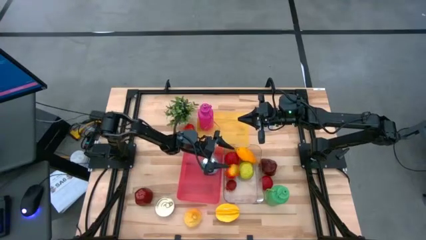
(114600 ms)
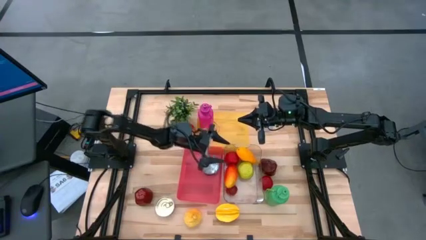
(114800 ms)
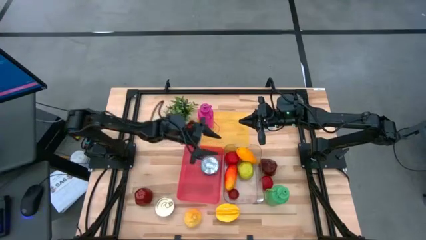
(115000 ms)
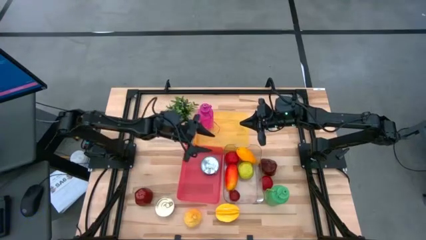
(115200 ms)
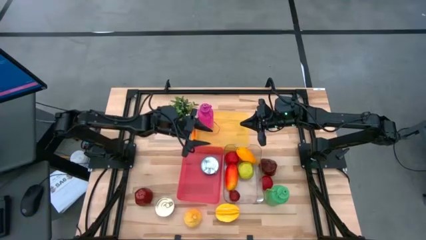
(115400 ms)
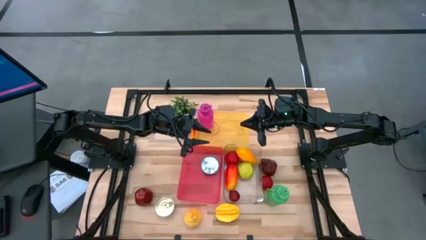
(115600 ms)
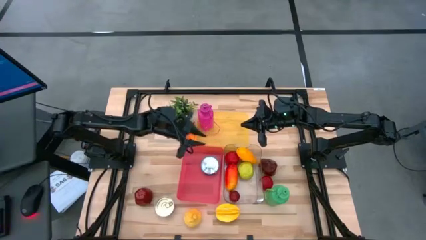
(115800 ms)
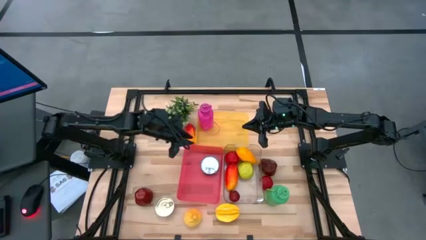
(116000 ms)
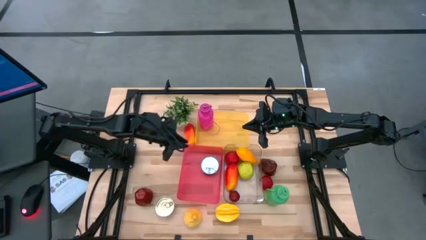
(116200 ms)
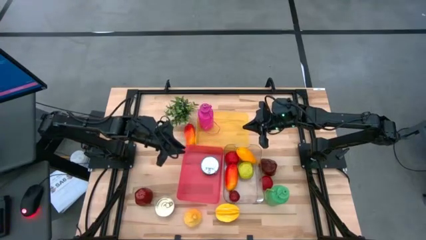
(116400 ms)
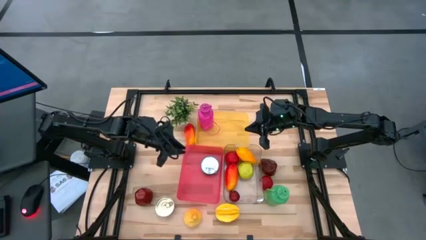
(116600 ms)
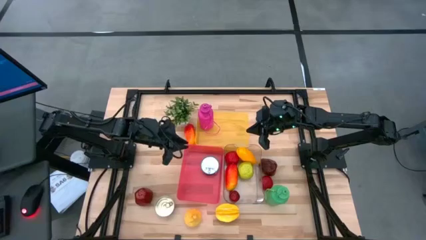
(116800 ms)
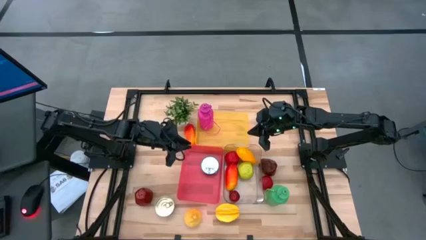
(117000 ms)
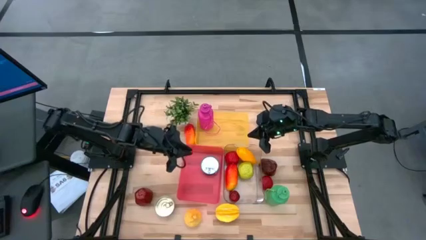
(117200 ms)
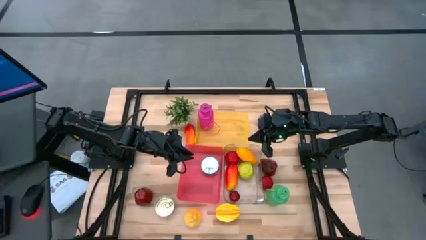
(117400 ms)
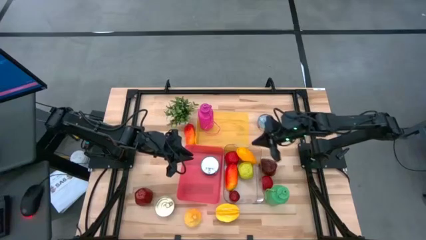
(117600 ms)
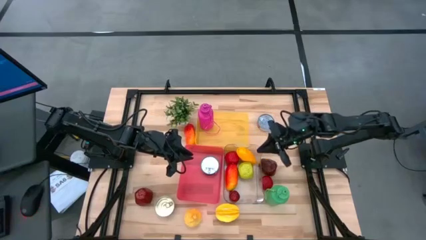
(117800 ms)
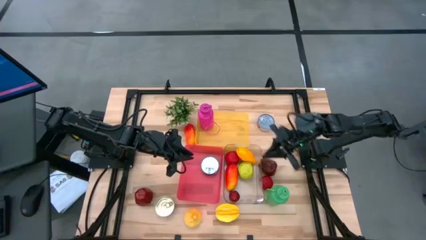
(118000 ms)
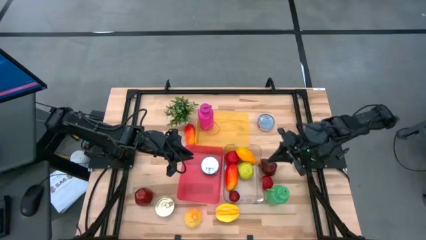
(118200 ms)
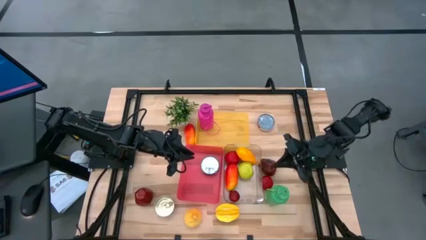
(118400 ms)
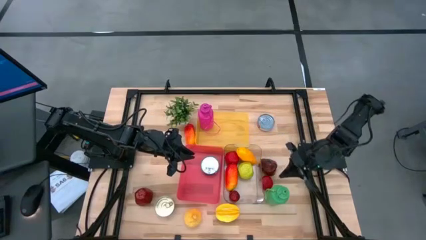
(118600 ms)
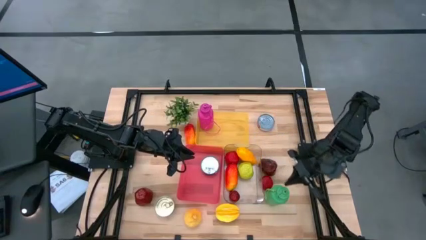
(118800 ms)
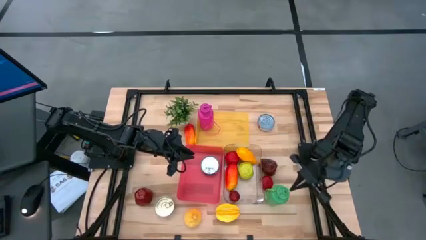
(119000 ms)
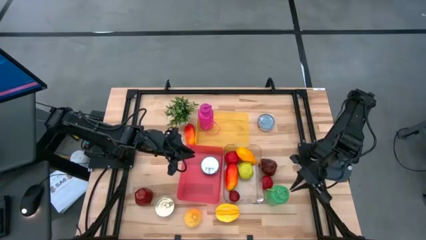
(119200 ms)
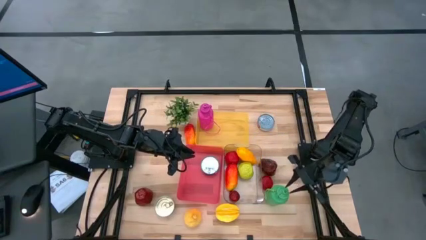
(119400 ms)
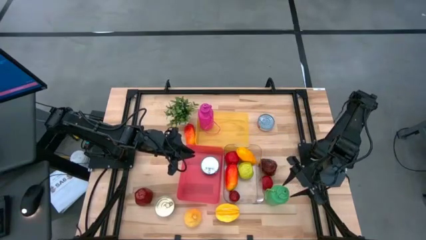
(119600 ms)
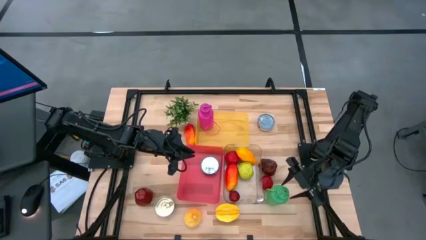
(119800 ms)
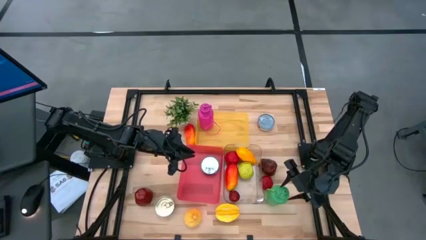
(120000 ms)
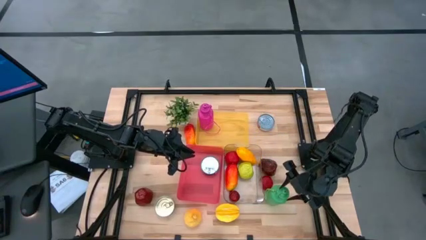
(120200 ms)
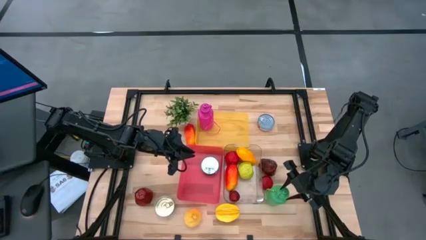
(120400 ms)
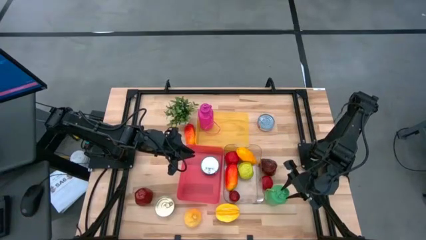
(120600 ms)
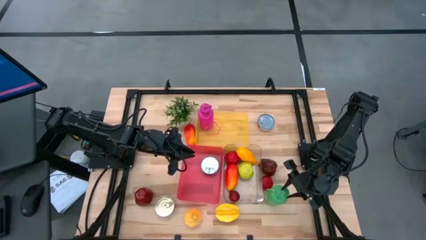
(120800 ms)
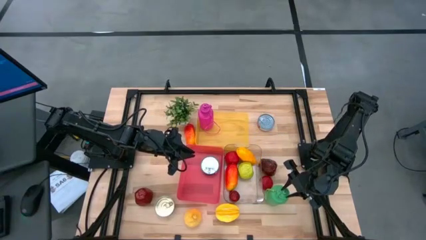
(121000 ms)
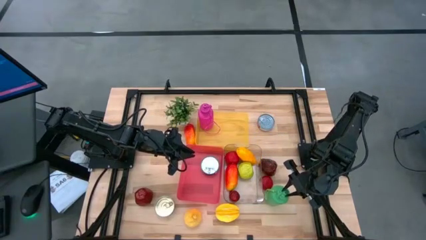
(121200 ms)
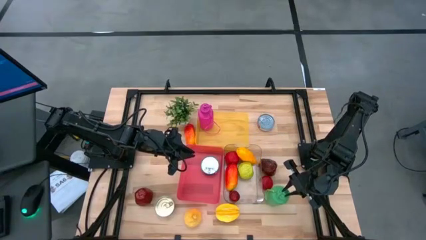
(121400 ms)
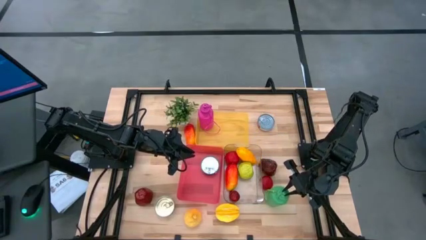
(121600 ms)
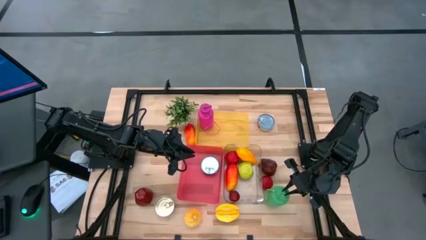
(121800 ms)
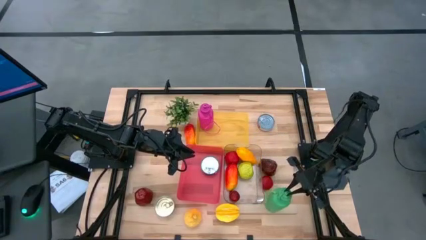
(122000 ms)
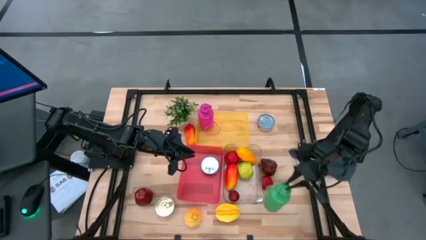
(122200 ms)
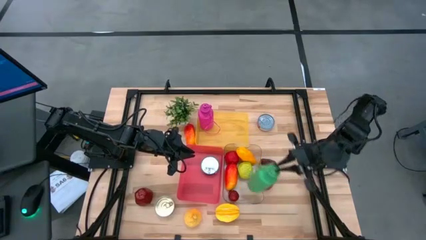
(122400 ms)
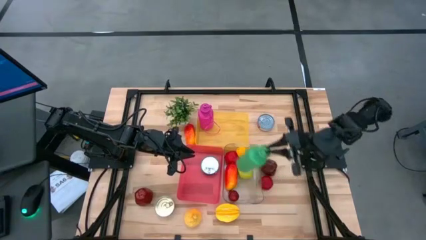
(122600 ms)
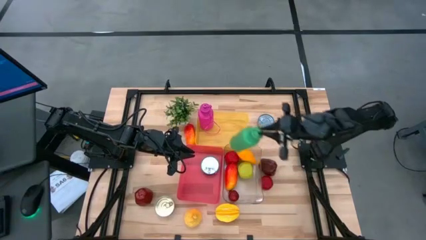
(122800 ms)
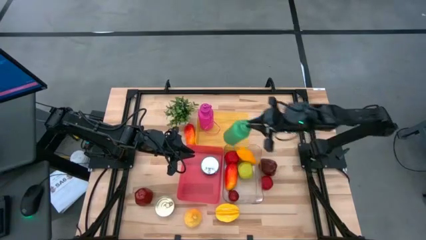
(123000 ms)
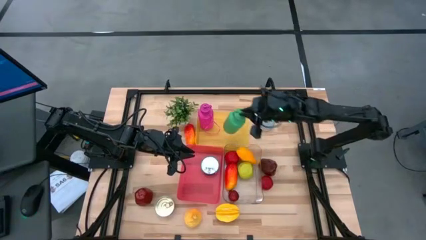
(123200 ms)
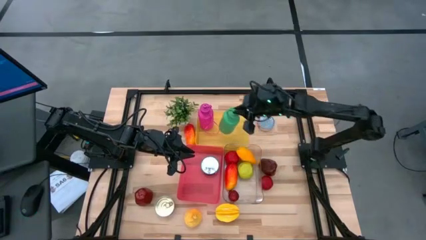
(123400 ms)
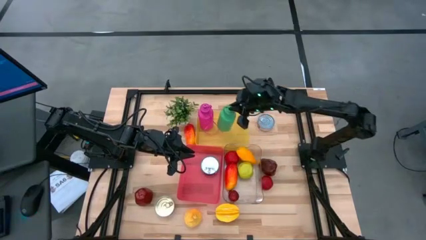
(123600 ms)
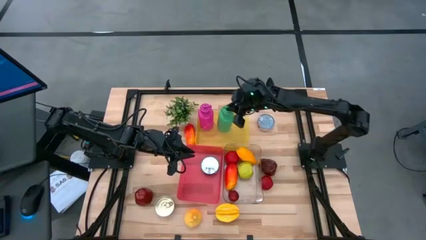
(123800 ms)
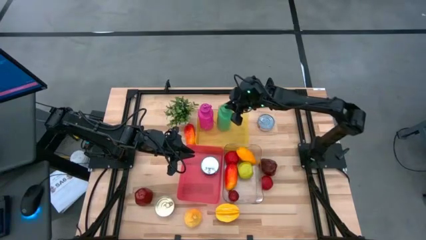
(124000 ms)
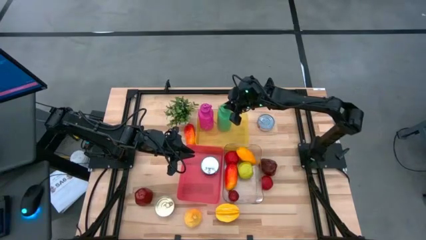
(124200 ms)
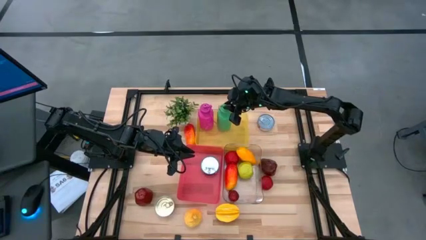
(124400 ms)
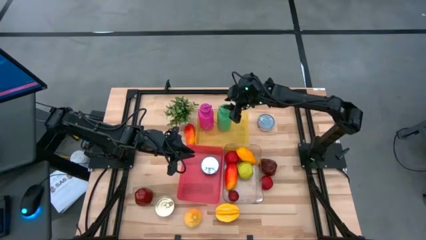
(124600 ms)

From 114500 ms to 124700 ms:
Task: Pick & Place Food Item
Put the green water bottle into the yellow bin

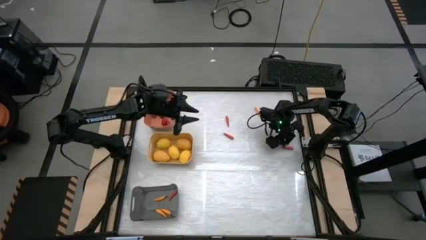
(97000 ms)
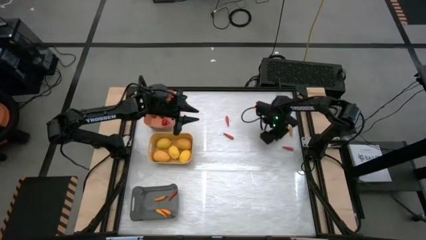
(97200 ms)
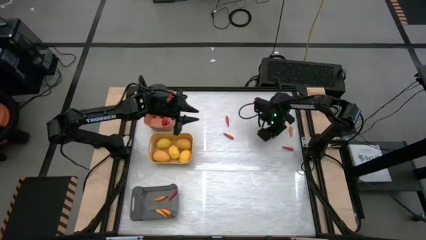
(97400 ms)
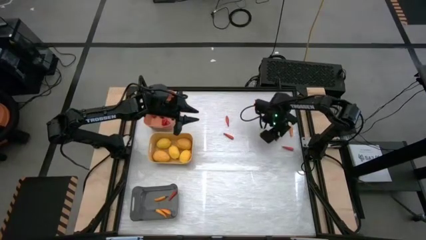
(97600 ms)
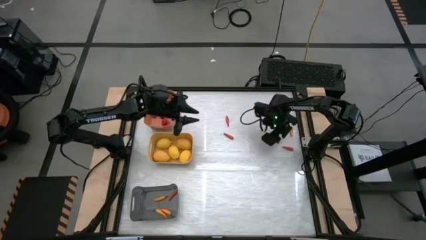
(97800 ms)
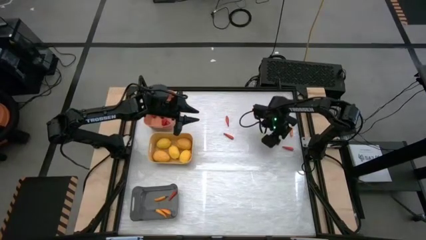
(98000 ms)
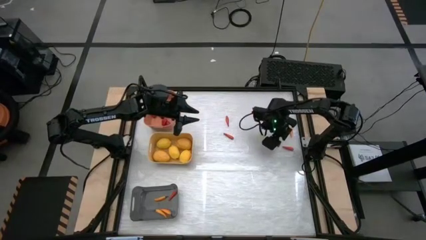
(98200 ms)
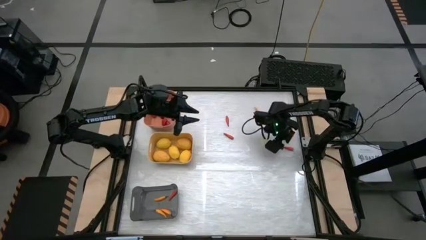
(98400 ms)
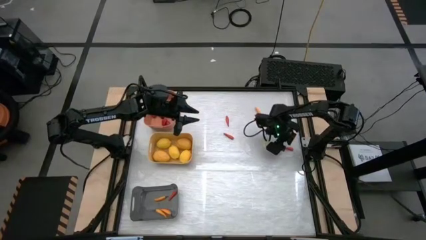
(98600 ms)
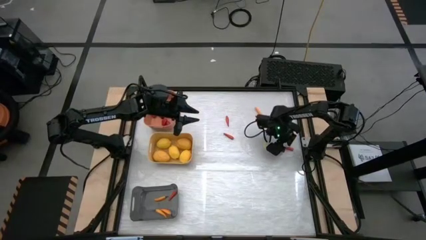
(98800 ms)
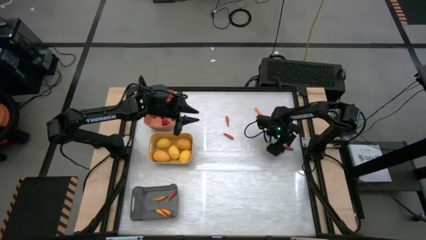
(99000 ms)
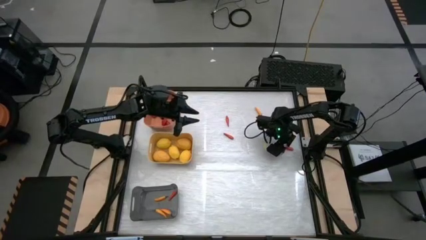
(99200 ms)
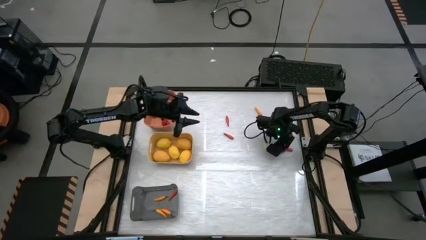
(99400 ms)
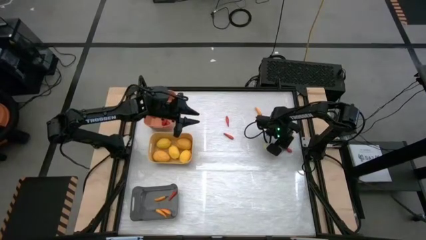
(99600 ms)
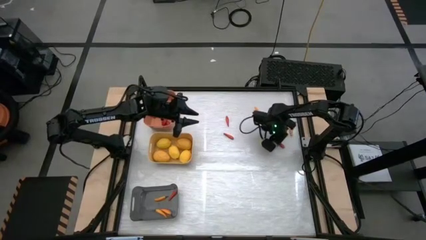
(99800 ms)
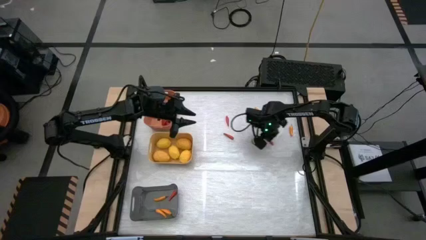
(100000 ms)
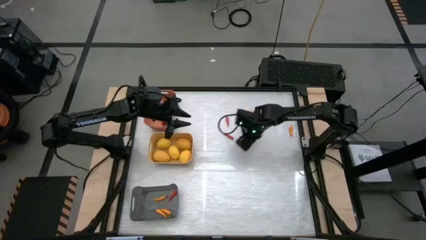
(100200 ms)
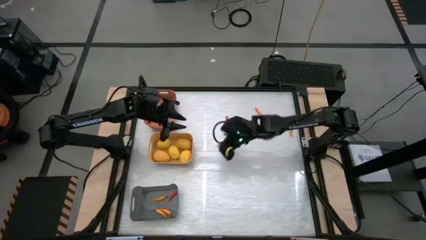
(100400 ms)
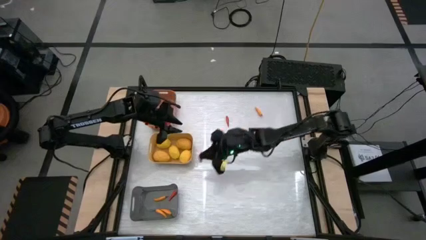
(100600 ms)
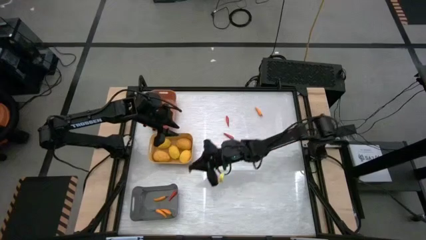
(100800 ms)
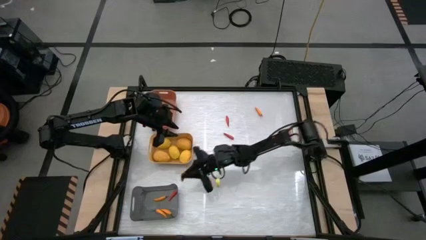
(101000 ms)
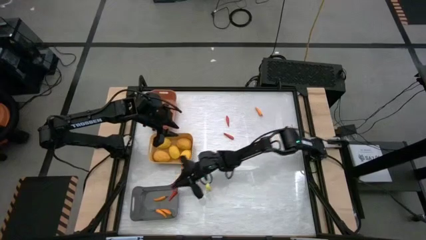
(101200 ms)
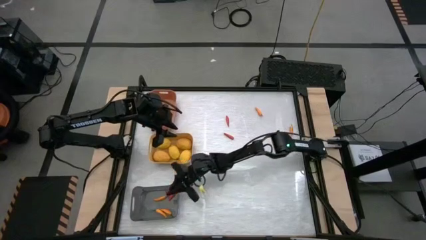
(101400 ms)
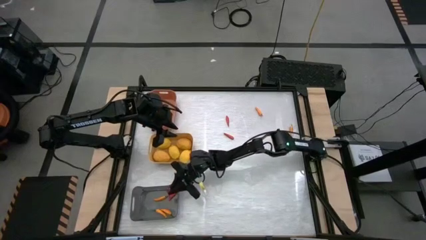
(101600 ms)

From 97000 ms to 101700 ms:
Task: Sort produce into baskets
Put the red chili pepper into the gray bin
